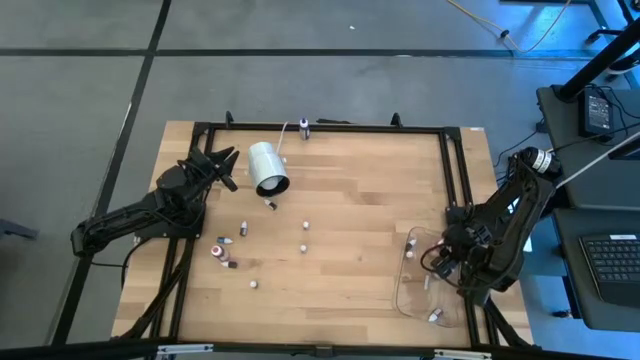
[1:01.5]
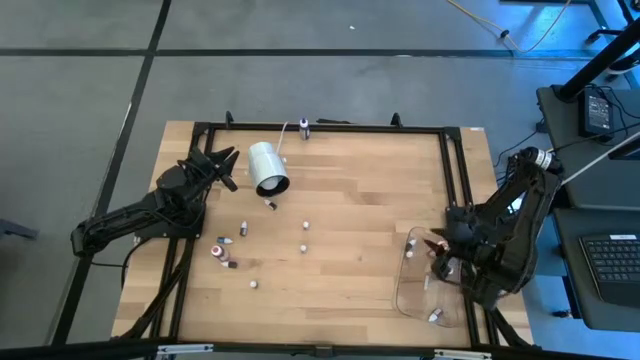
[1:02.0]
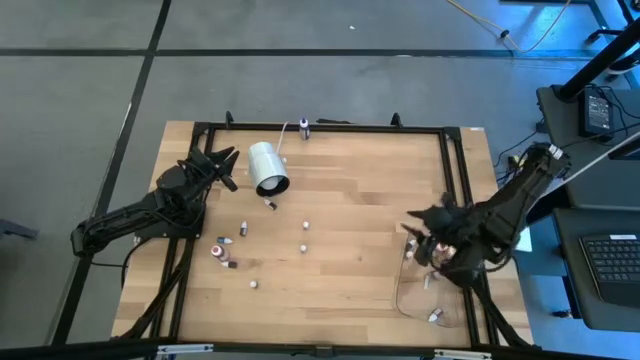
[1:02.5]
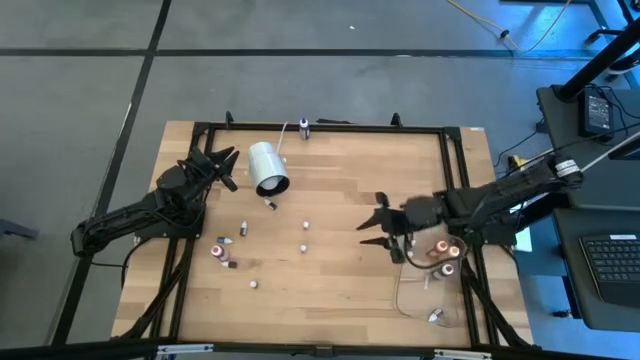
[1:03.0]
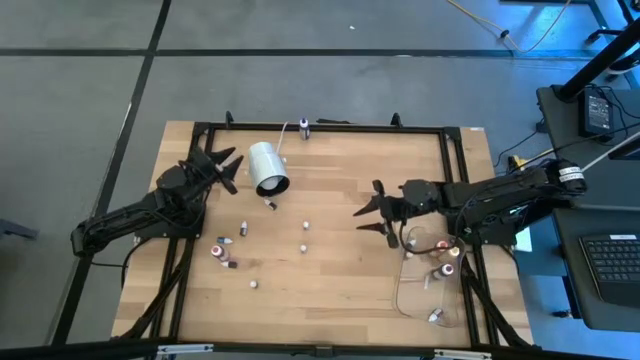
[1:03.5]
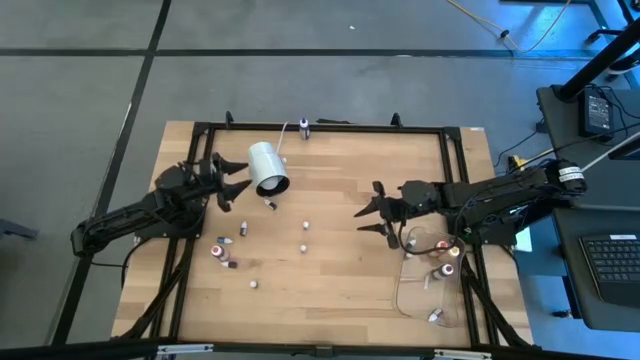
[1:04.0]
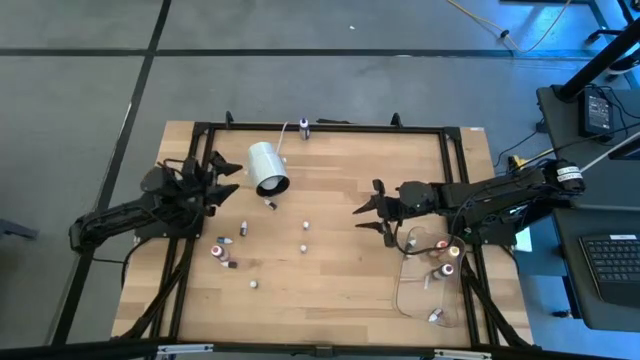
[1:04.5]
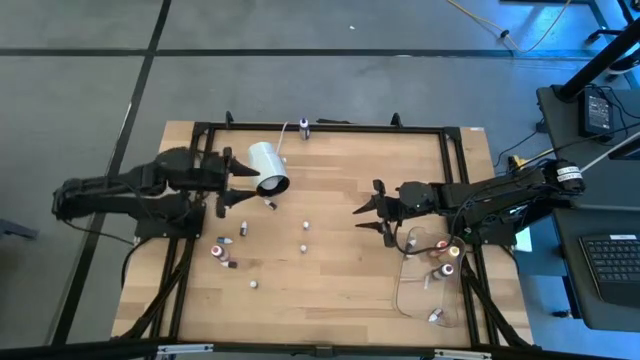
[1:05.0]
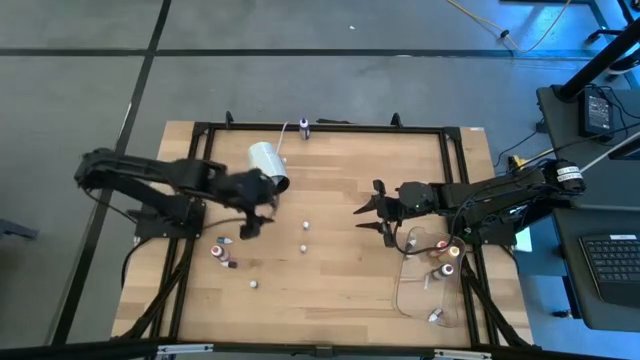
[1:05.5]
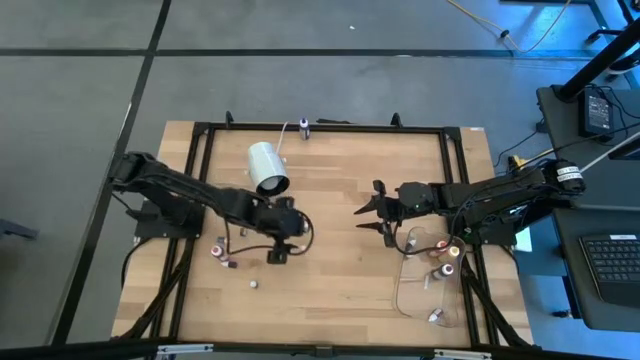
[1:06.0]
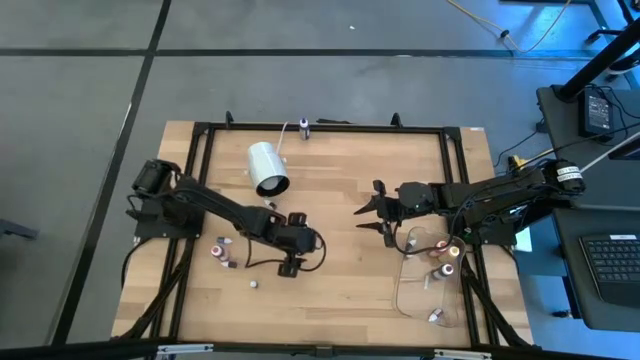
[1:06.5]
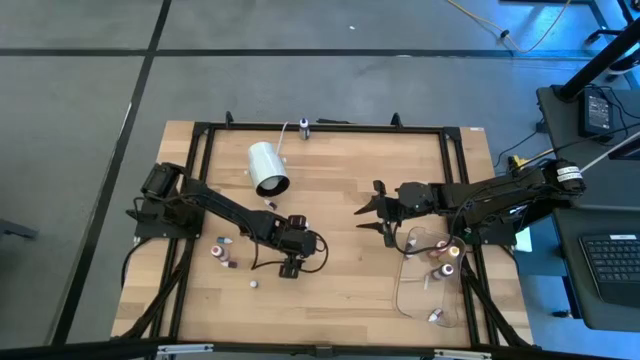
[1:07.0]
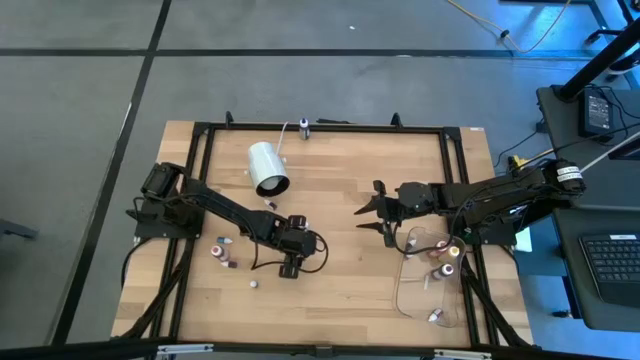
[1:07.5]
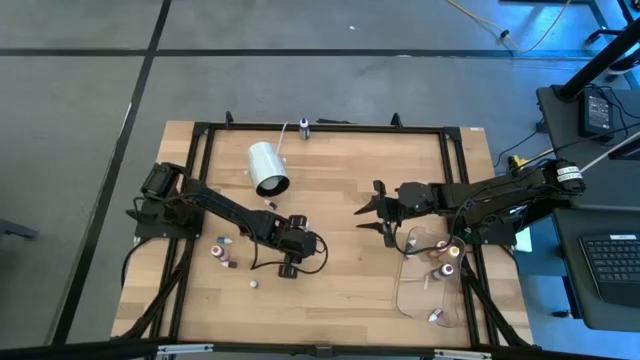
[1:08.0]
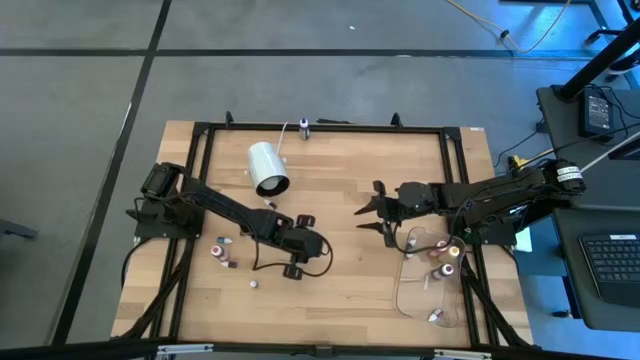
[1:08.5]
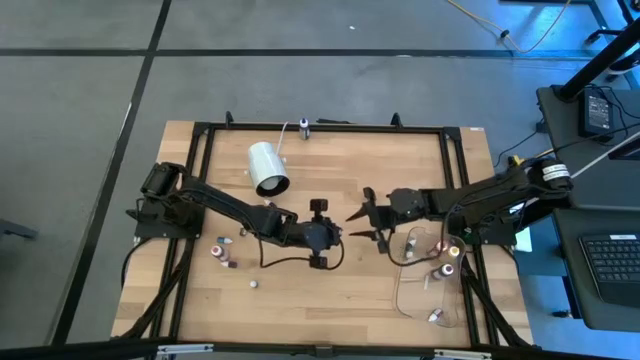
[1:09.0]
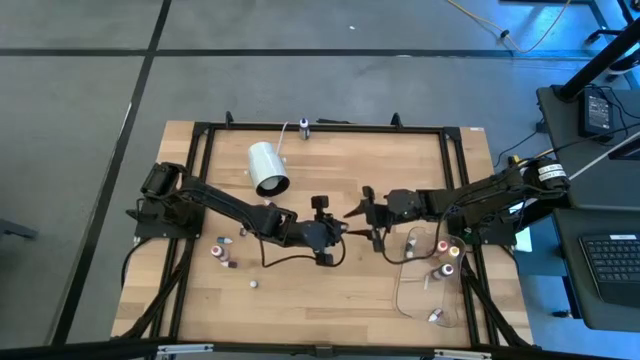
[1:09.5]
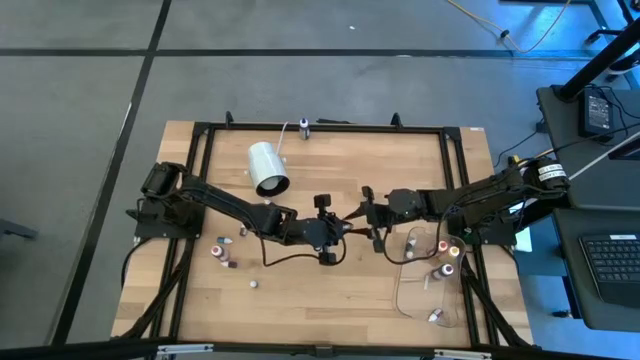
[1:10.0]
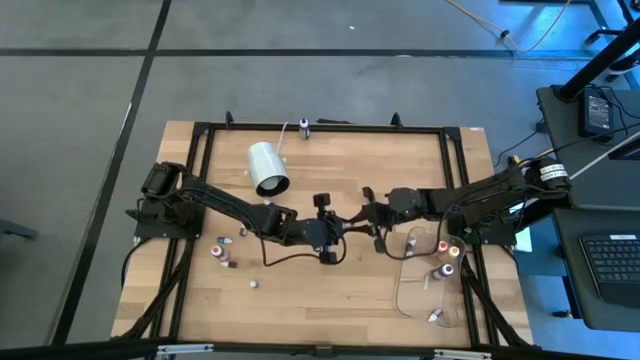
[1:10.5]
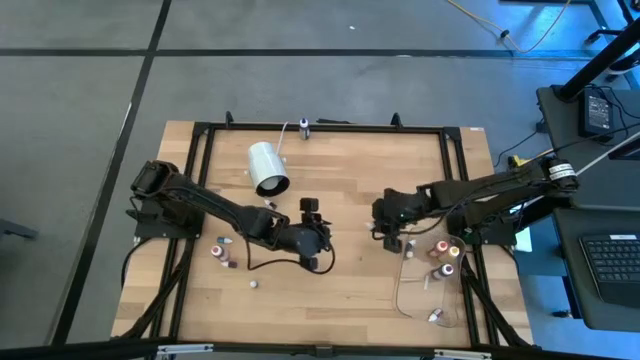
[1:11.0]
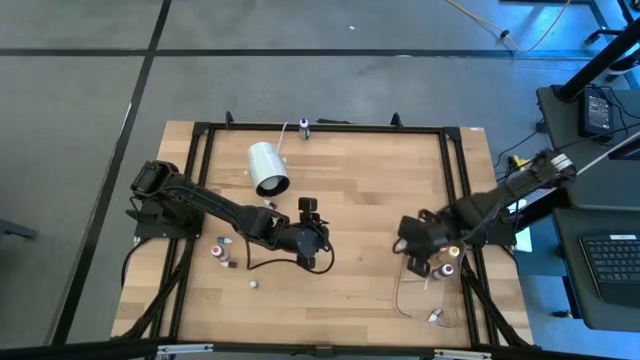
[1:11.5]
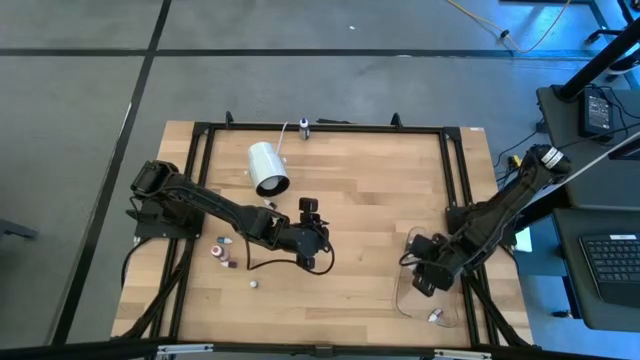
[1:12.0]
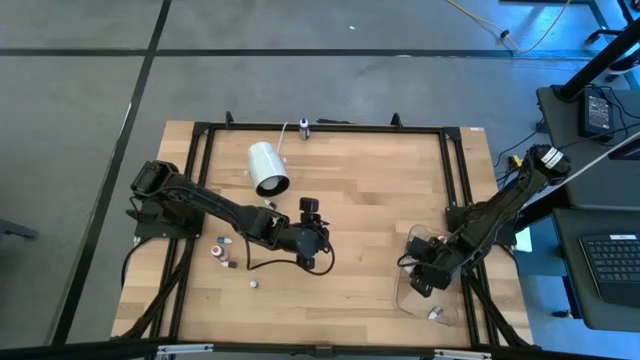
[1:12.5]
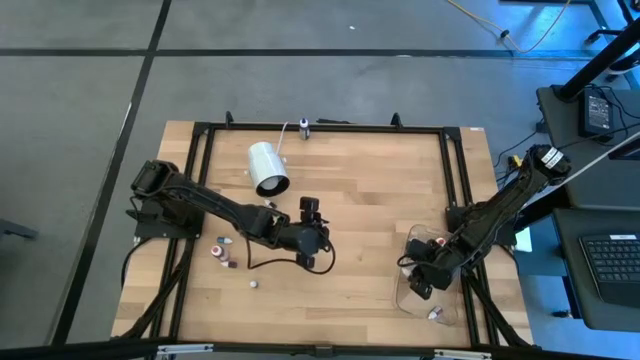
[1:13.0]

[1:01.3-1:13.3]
Task: Pick & Place food coloring
Put the right small blue food coloring bottle into the transparent bin

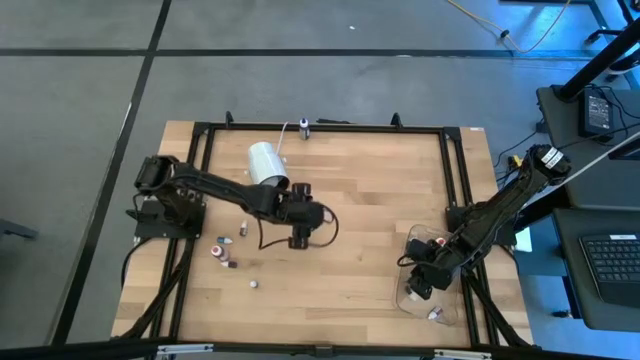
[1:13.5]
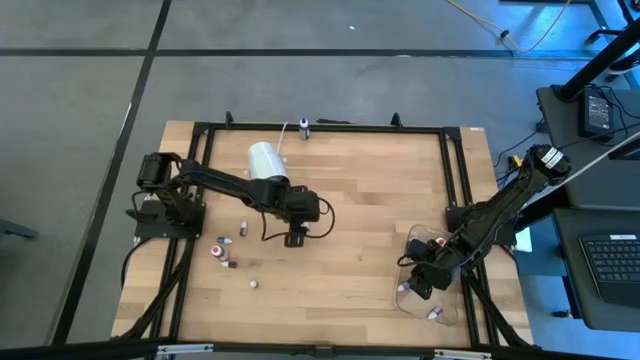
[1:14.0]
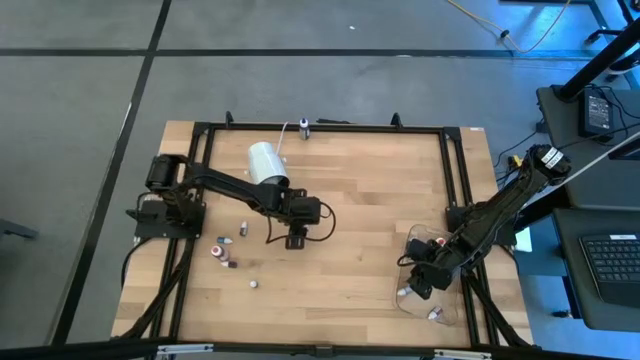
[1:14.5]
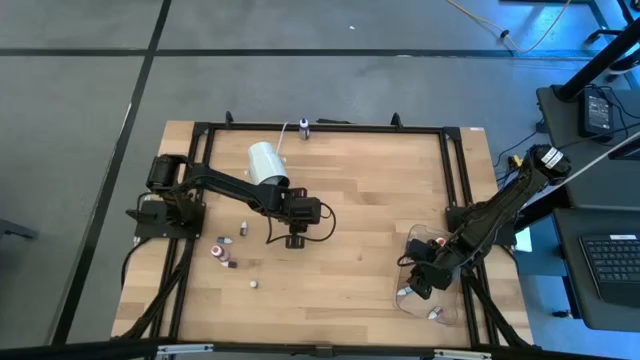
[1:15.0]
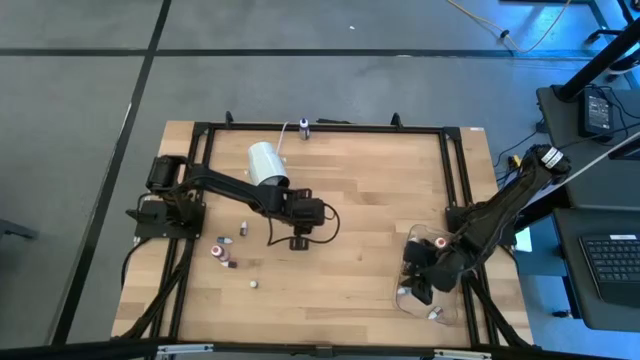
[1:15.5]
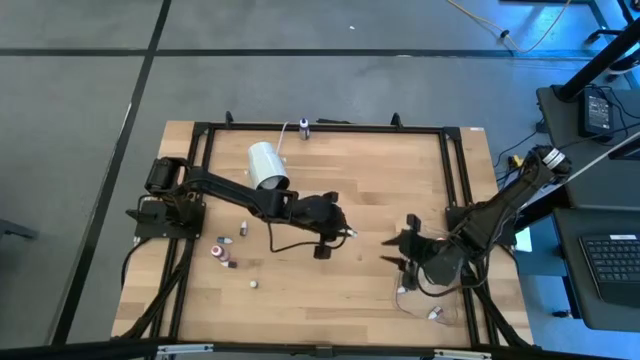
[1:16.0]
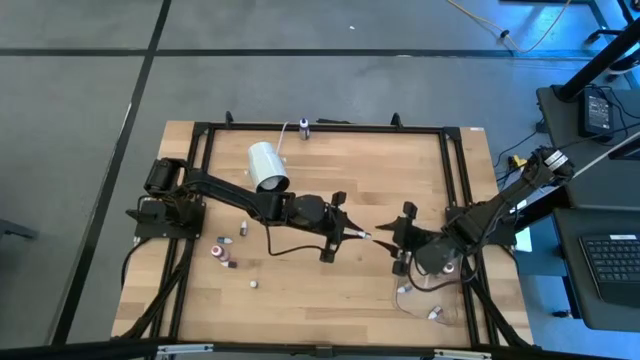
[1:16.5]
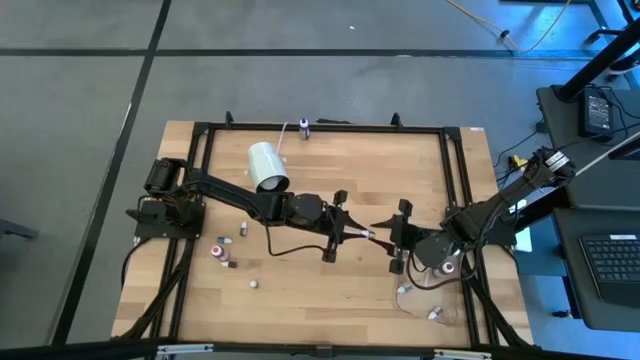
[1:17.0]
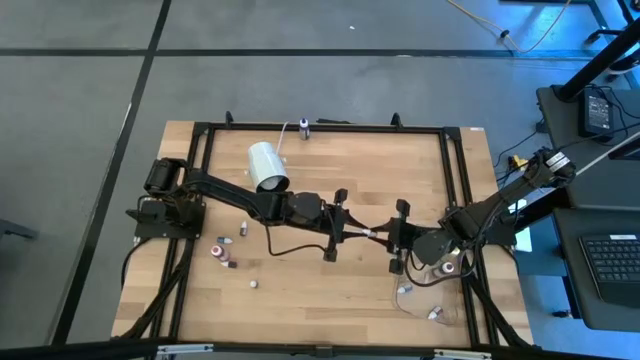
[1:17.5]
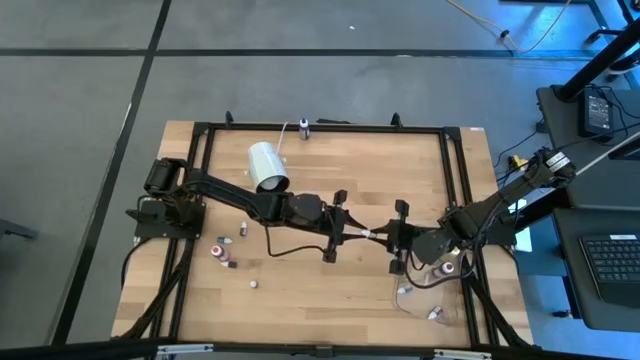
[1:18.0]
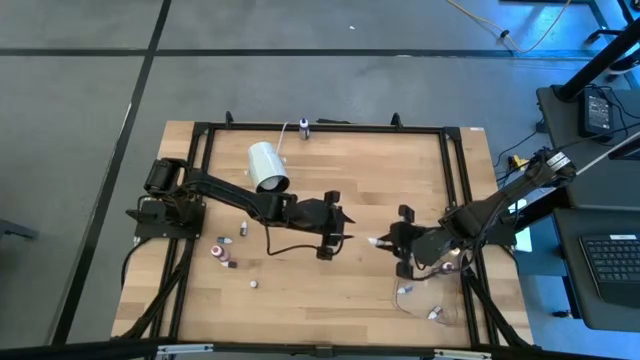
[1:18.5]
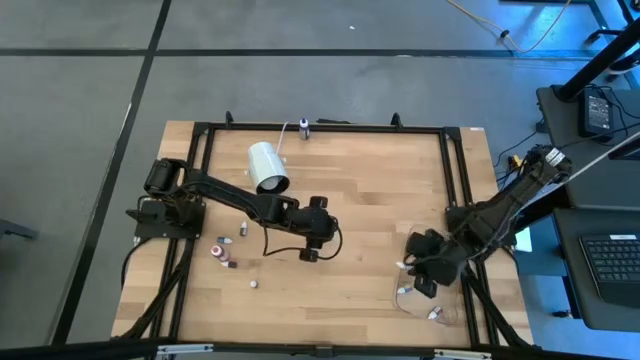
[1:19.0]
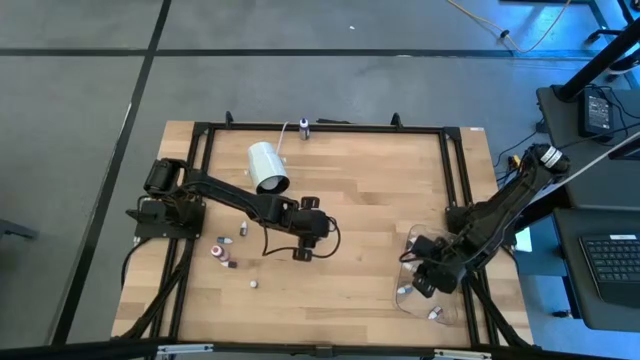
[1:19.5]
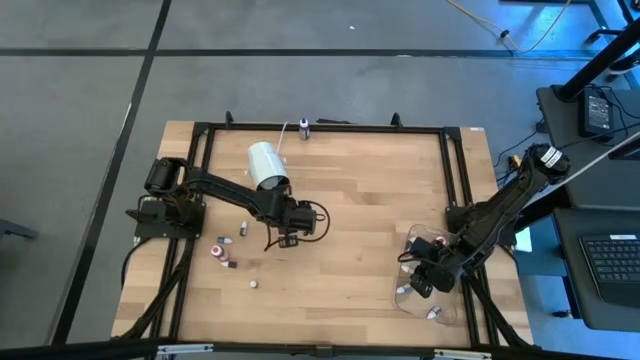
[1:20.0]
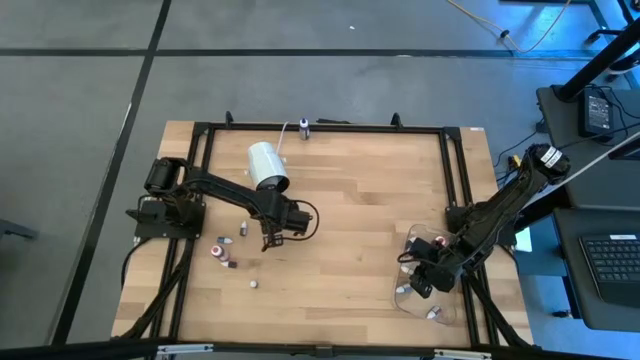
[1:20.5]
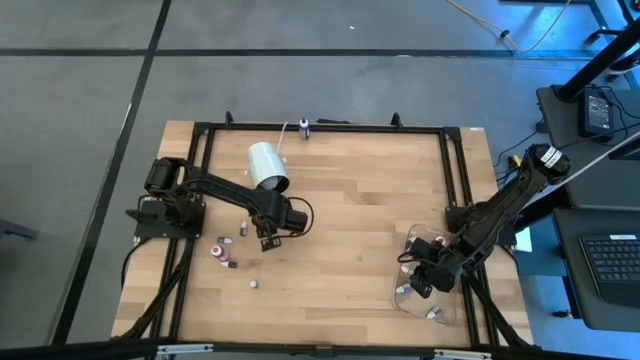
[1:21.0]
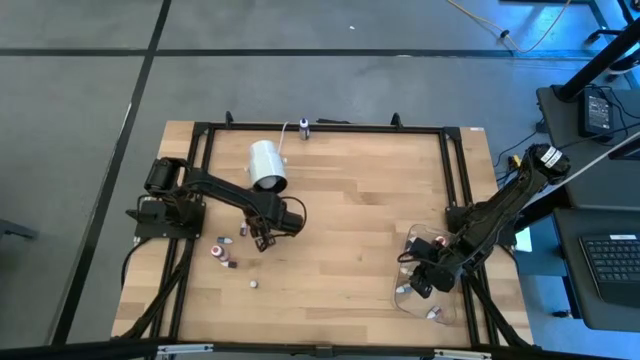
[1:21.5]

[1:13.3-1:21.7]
Put the small green food coloring bottle into the transparent bin

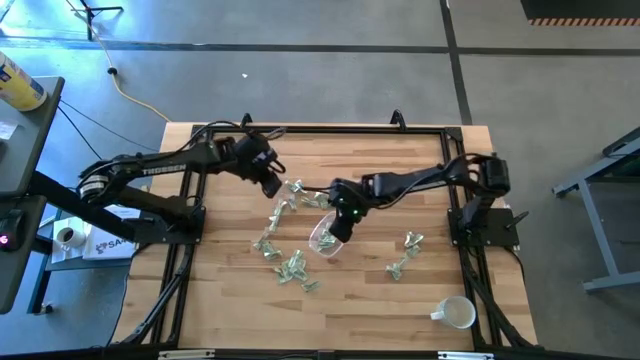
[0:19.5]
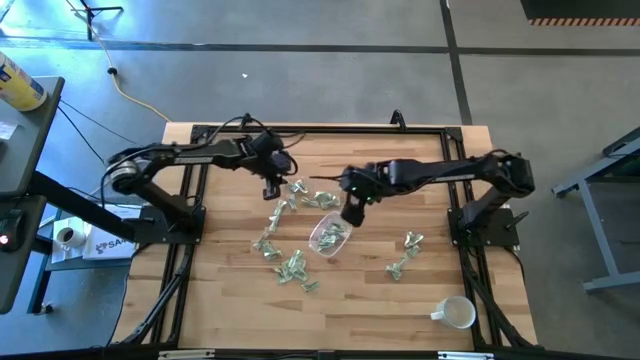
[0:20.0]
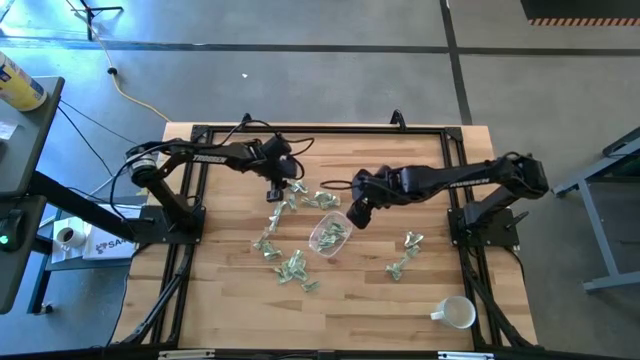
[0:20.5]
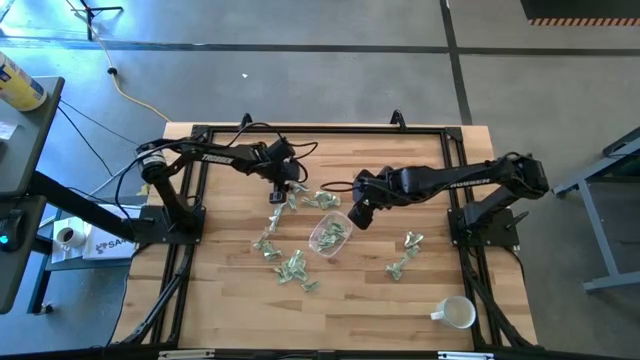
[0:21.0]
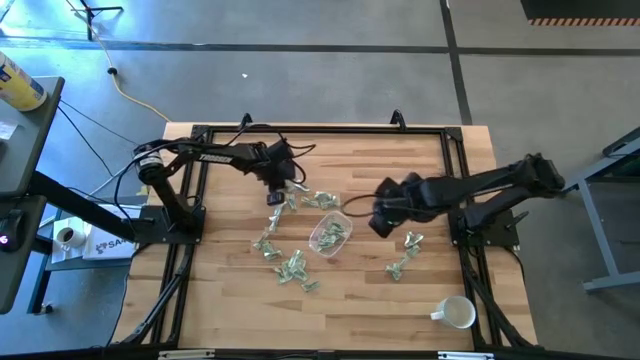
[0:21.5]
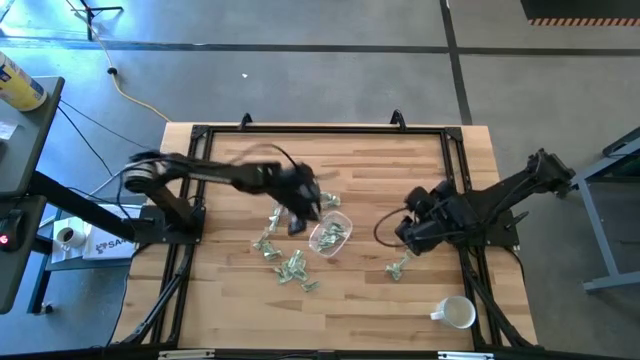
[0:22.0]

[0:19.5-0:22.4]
Task: Pick and place Stevia / Truvia into bins
Put the stevia packet into the transparent bin
